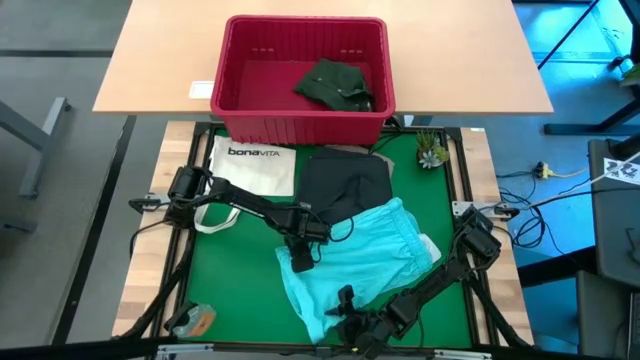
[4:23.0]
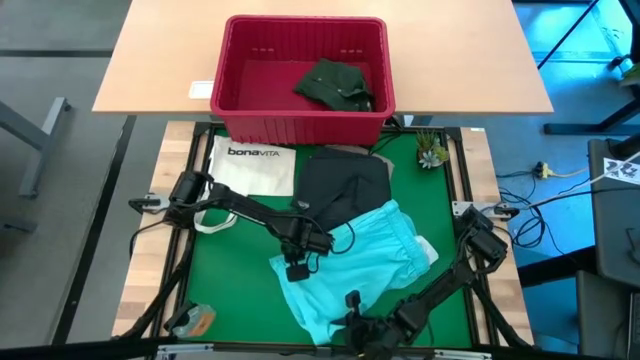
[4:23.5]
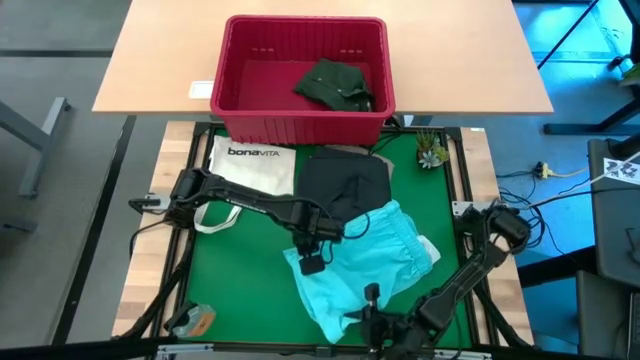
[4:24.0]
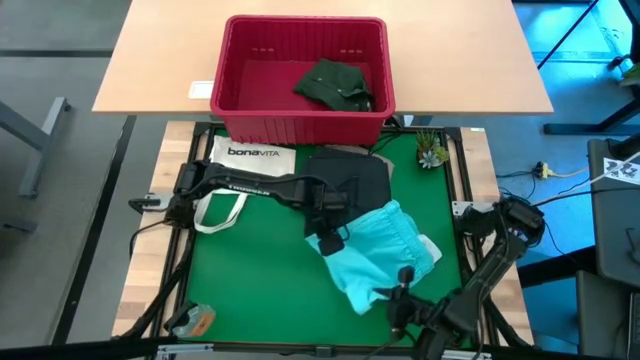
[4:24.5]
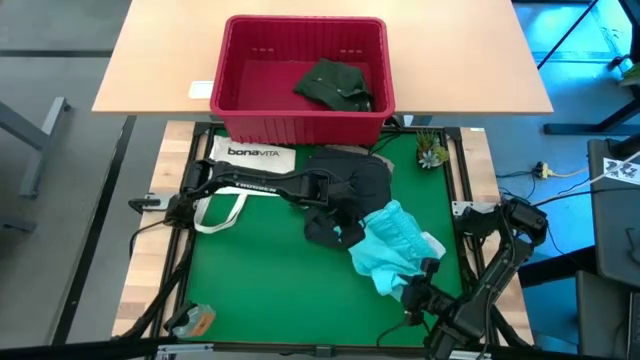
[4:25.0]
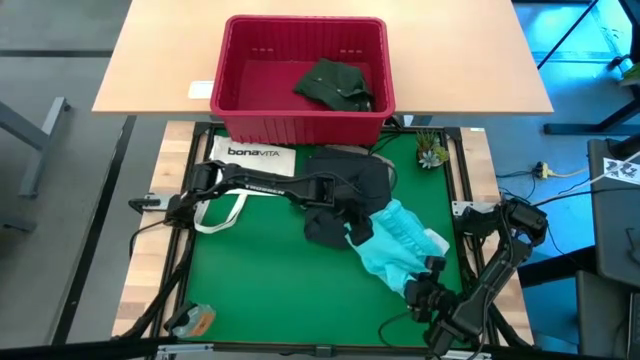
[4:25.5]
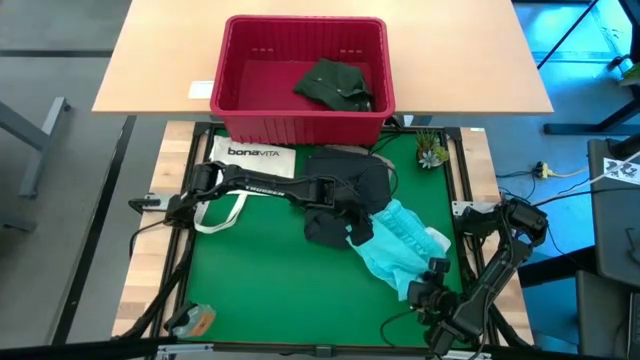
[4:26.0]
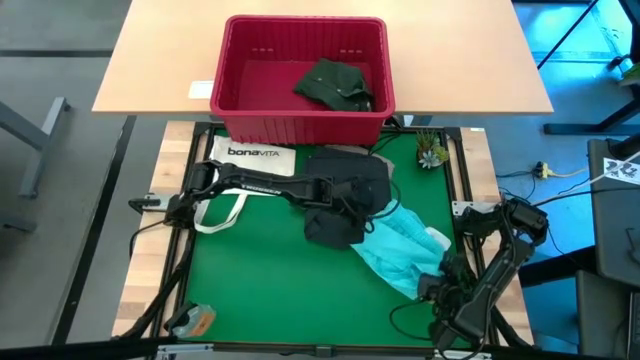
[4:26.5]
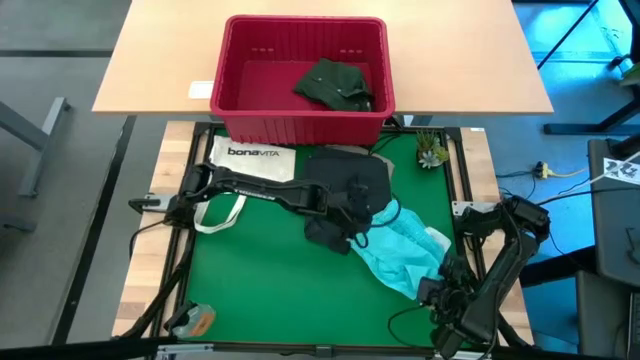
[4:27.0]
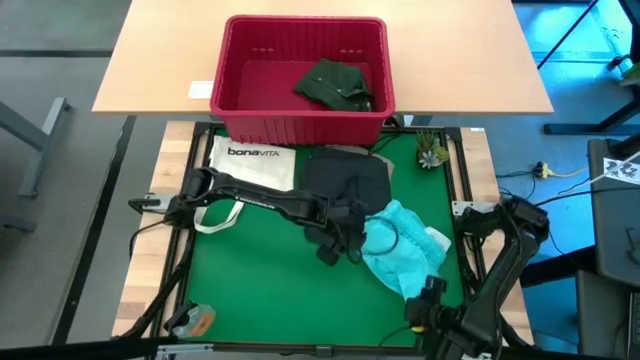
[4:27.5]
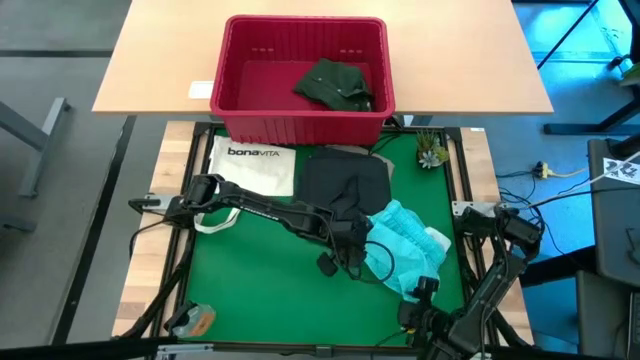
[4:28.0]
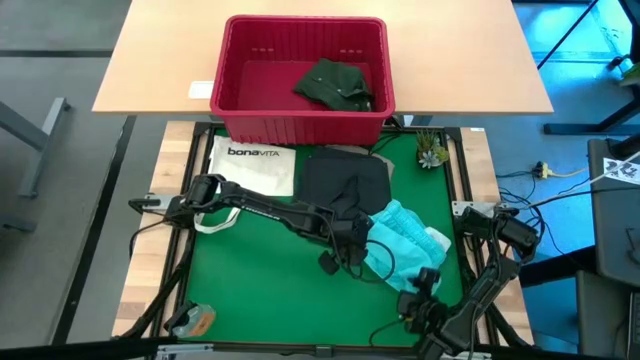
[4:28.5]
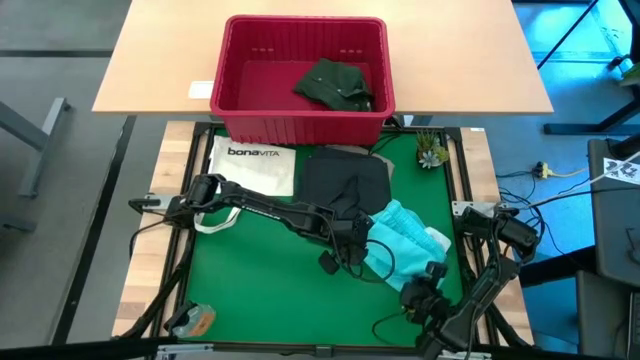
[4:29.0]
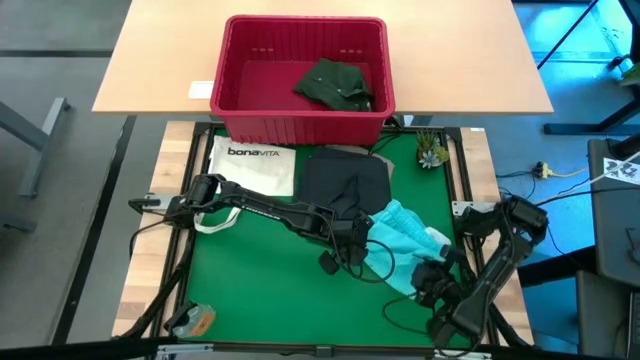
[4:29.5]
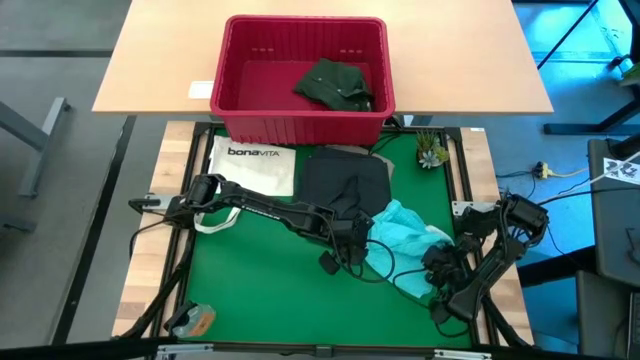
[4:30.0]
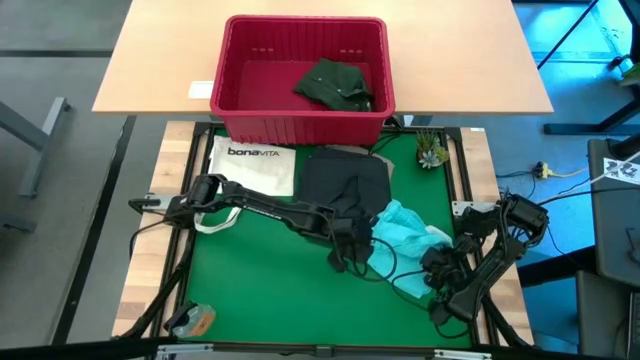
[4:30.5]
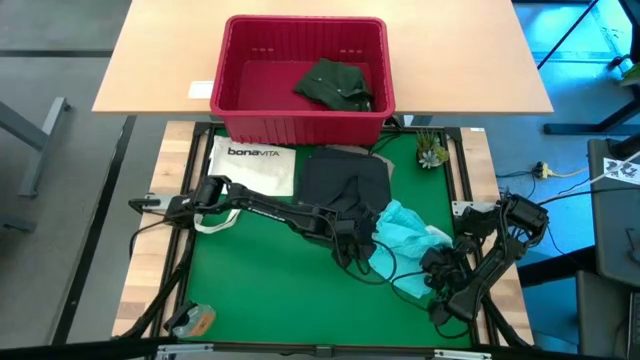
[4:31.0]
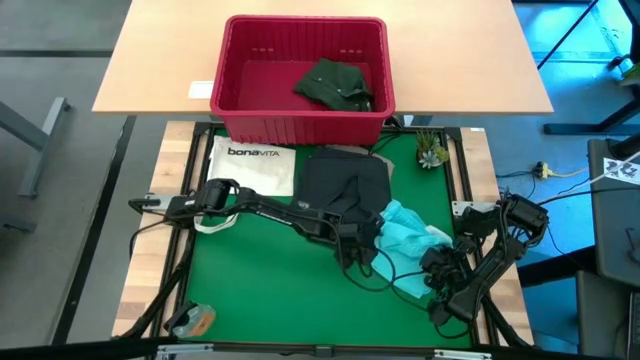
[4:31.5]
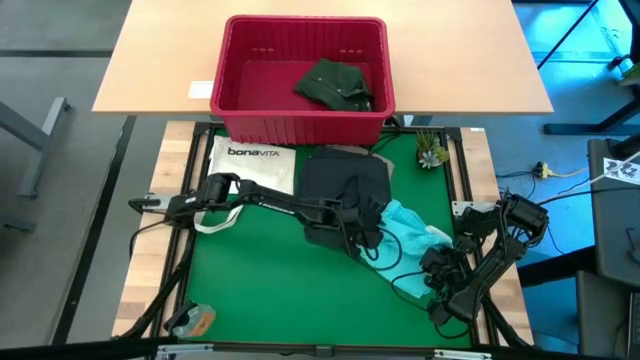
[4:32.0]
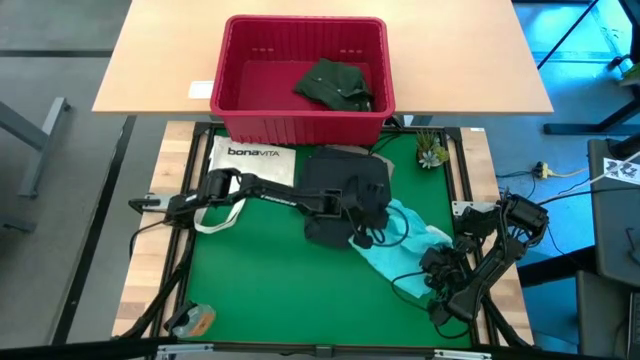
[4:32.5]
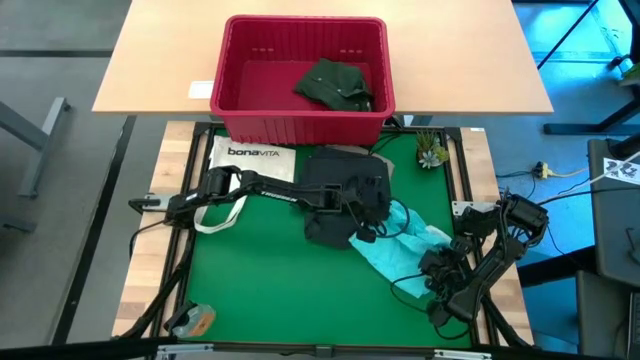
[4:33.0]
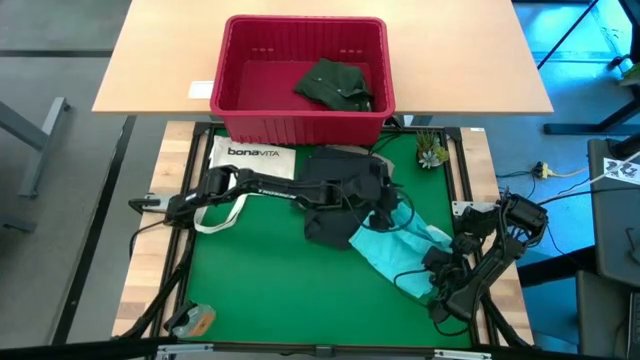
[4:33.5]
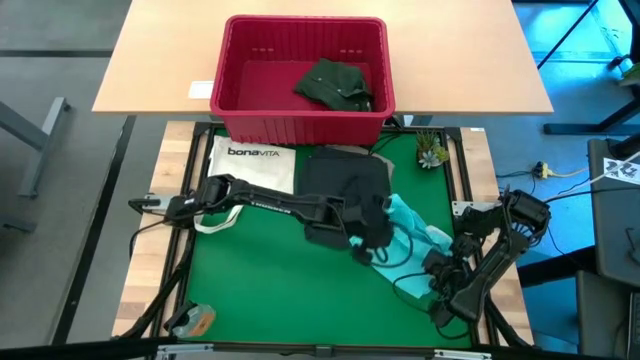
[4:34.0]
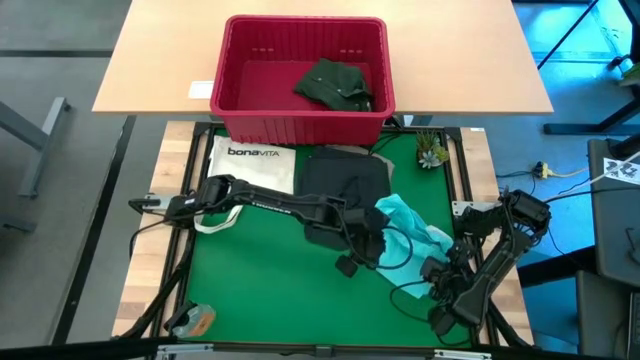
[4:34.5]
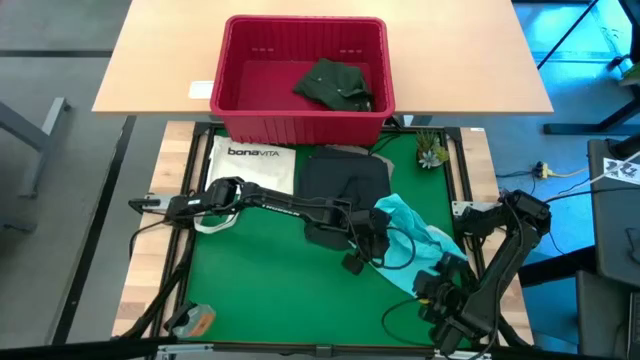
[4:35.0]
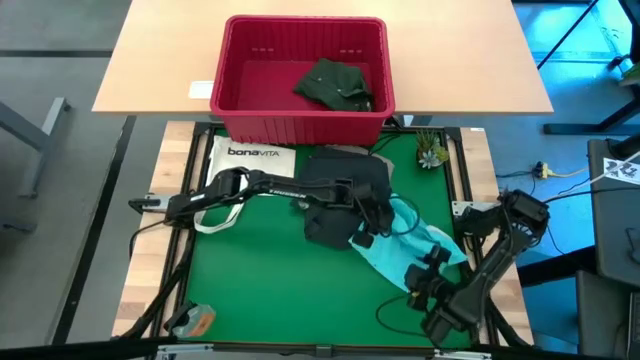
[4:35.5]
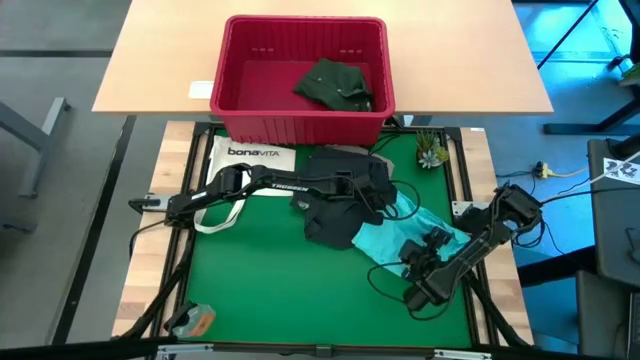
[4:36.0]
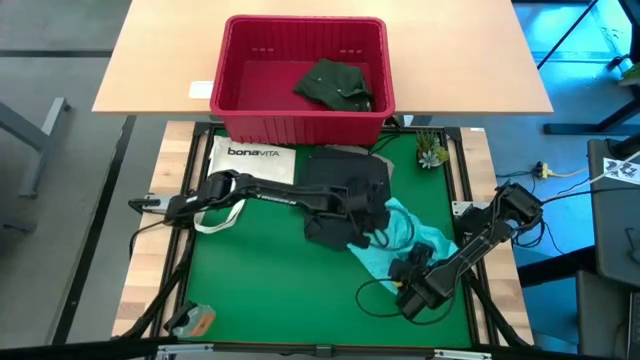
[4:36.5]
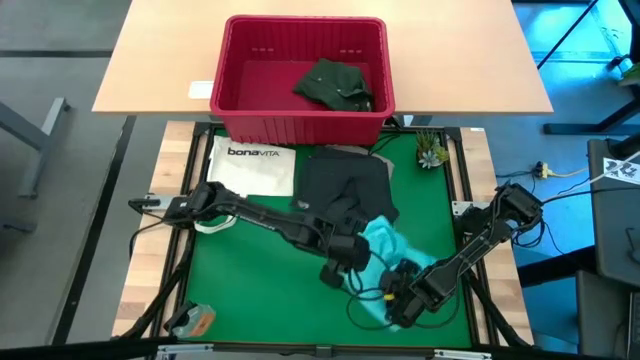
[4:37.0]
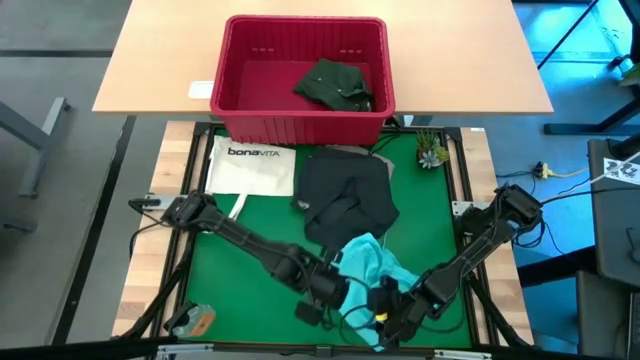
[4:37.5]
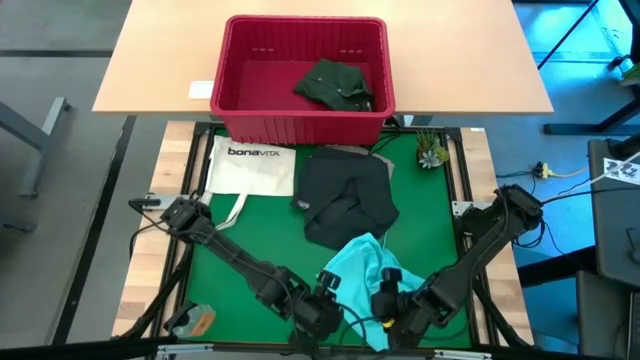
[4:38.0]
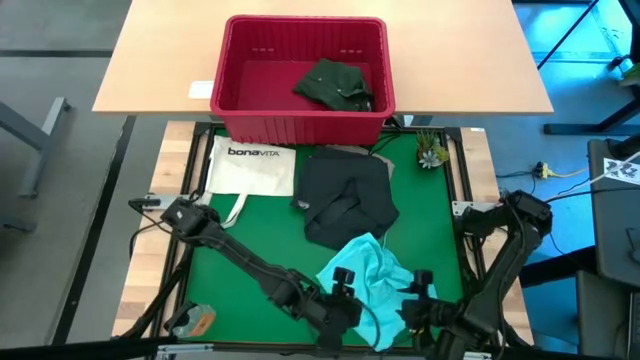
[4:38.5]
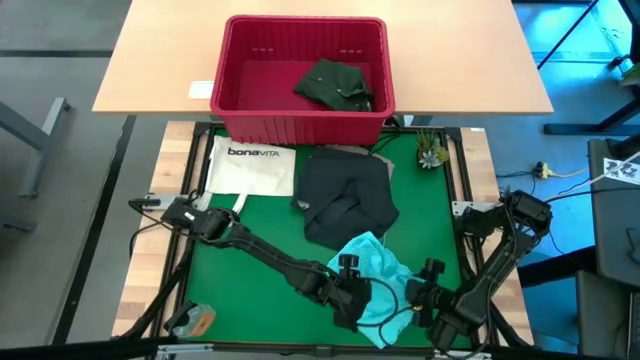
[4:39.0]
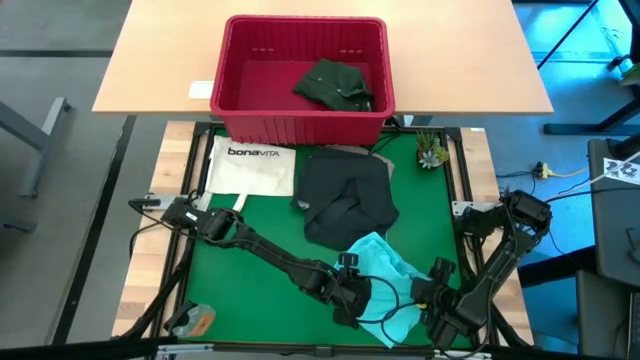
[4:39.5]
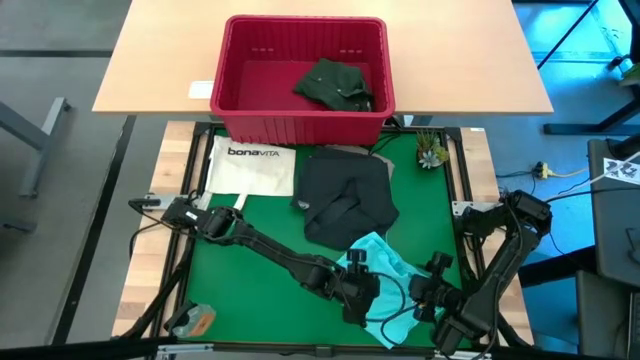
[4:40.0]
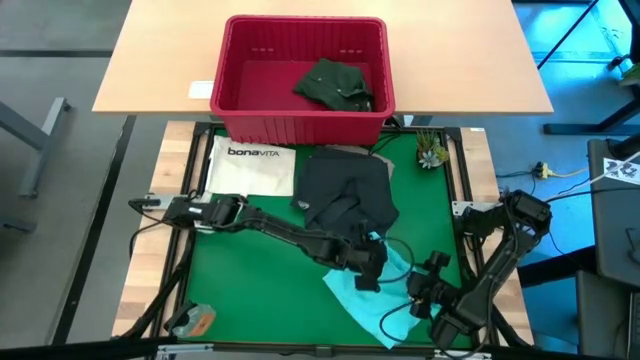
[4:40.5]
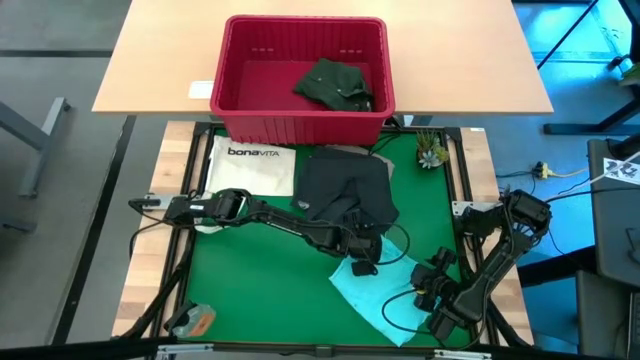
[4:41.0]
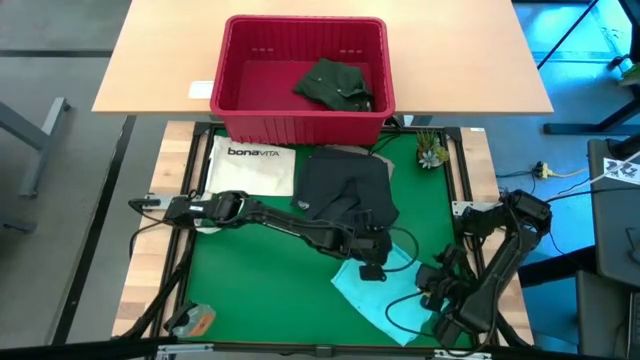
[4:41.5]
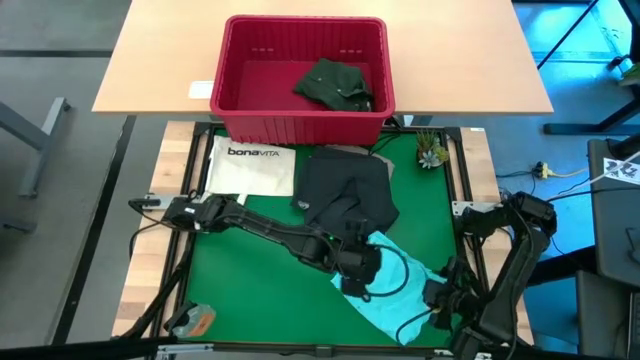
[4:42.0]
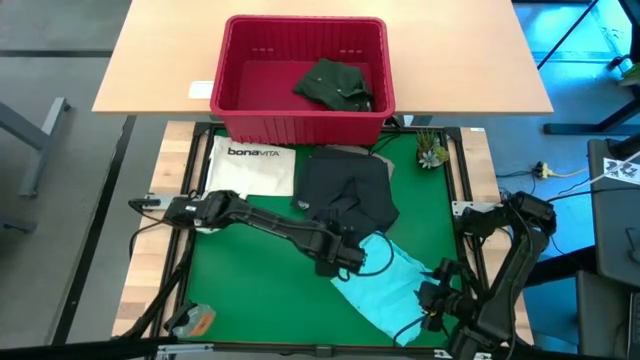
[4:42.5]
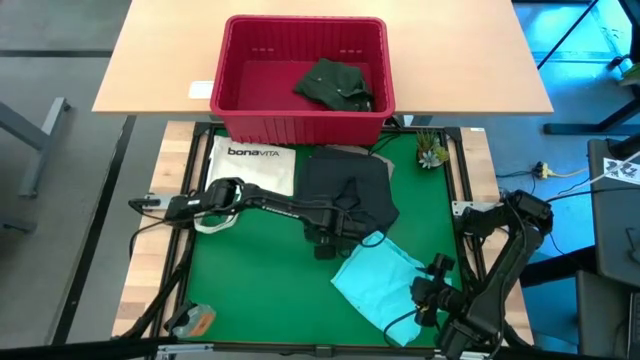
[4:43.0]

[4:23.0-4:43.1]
Task: Fold Laundry from Bin
Fold the light blue shorts from the red laundry bin

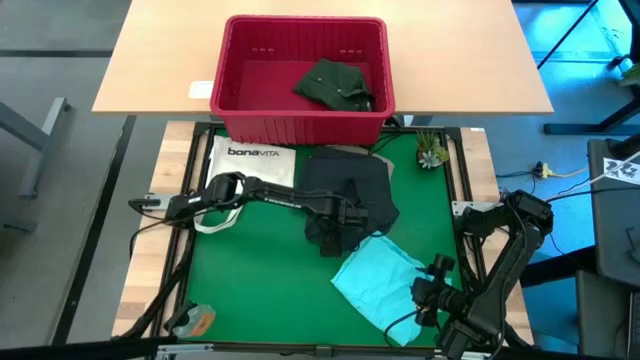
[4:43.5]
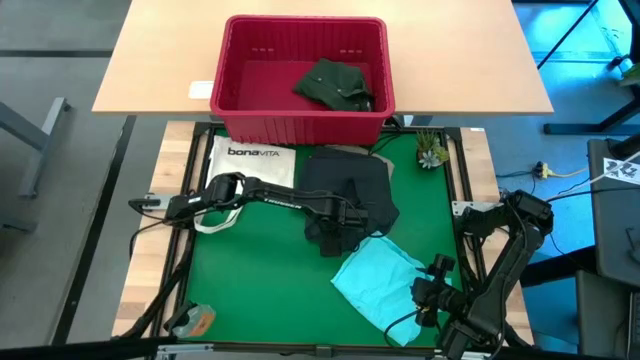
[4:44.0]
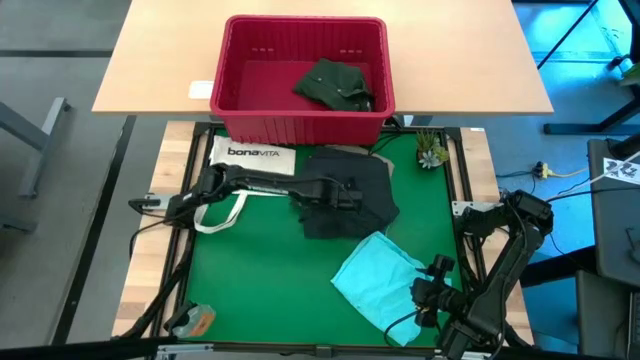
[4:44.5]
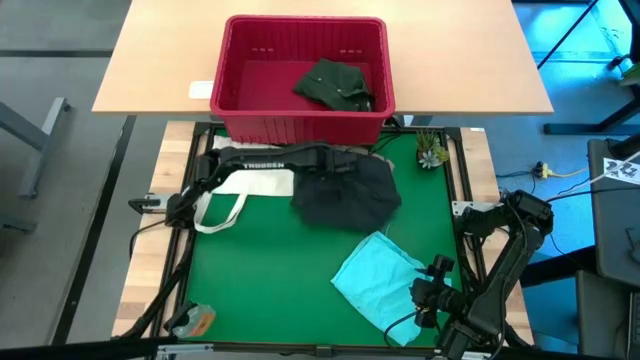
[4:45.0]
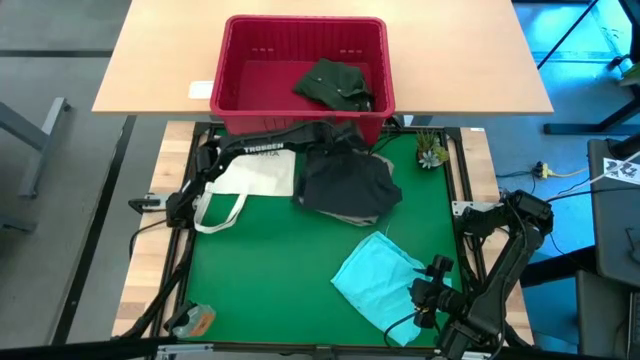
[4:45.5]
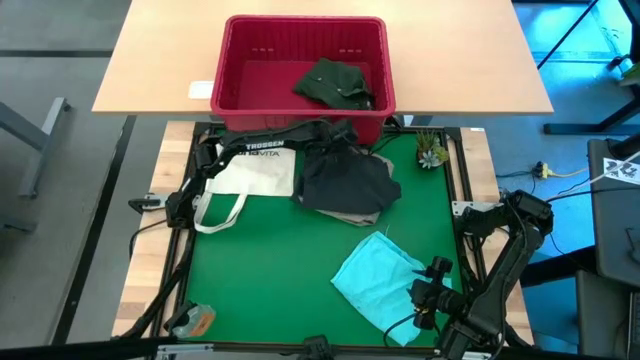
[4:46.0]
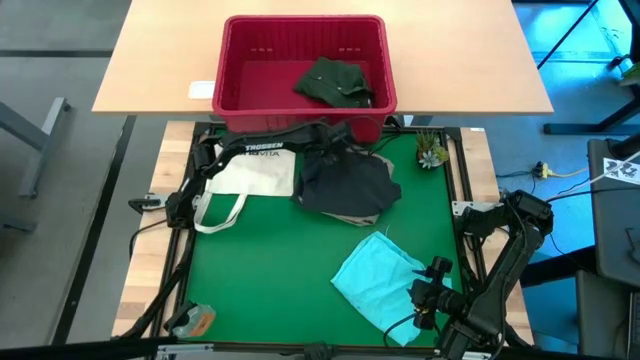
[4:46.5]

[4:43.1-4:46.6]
Adjust the folded black shorts
